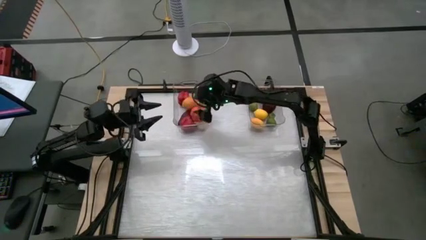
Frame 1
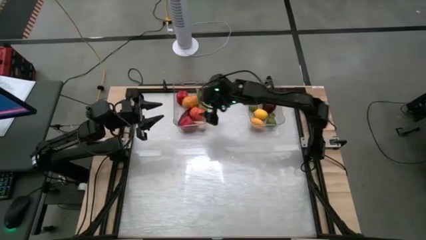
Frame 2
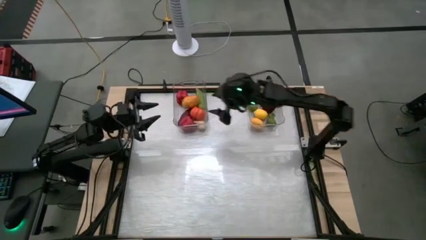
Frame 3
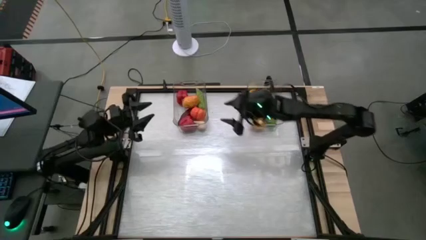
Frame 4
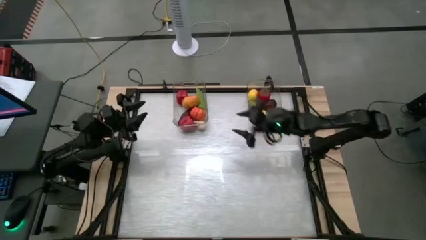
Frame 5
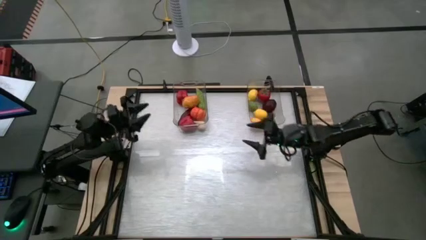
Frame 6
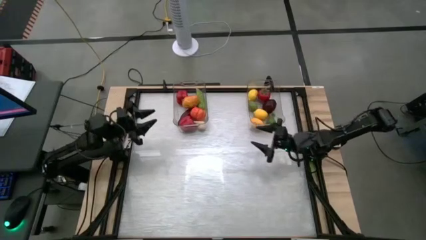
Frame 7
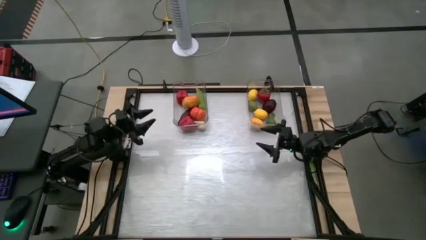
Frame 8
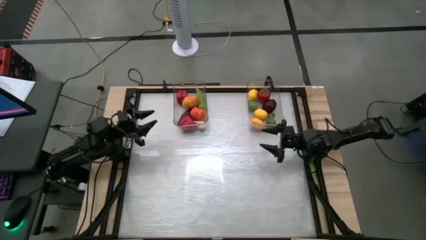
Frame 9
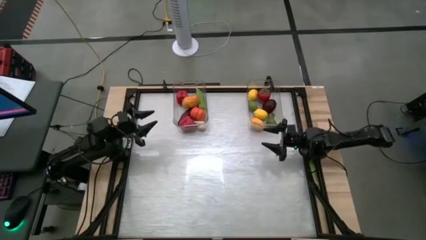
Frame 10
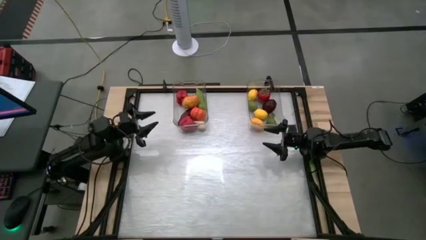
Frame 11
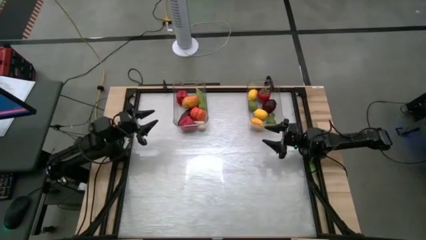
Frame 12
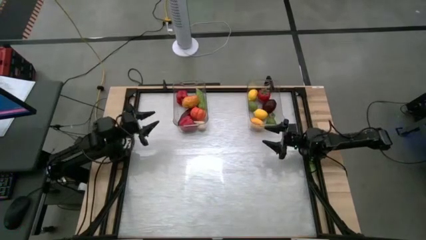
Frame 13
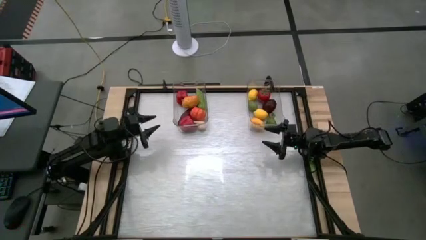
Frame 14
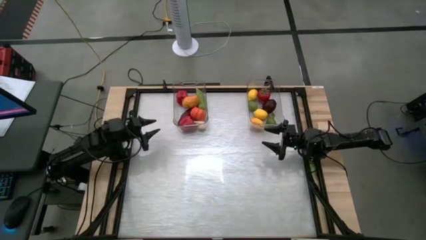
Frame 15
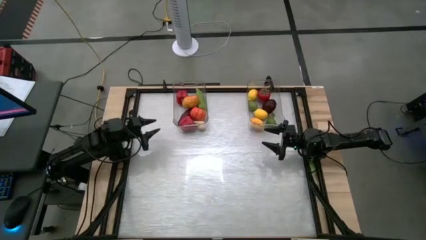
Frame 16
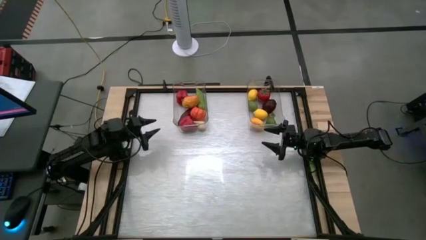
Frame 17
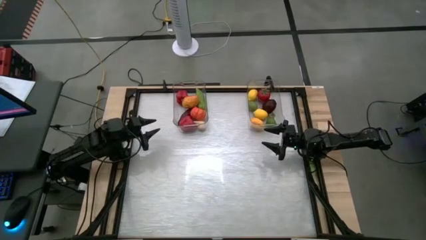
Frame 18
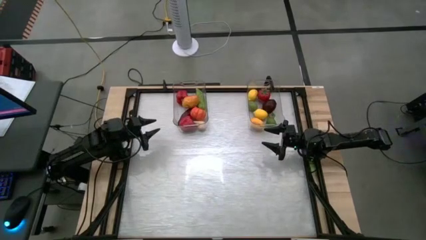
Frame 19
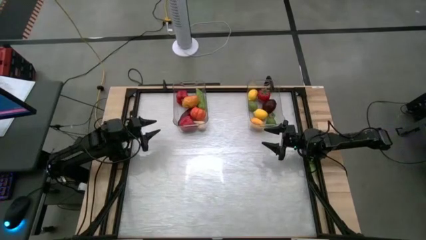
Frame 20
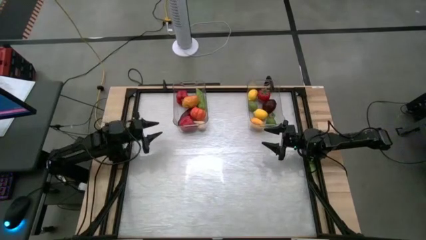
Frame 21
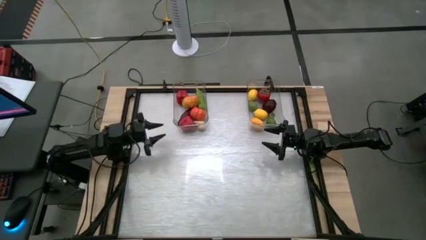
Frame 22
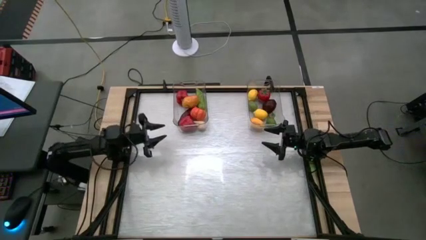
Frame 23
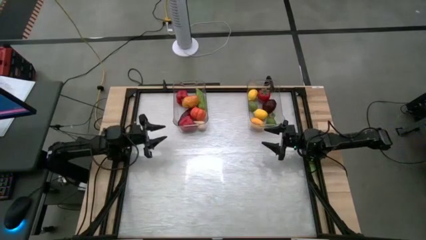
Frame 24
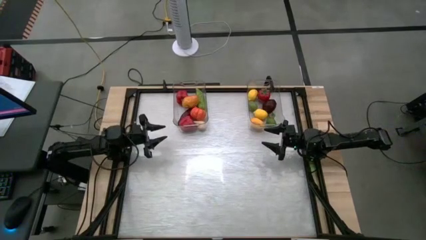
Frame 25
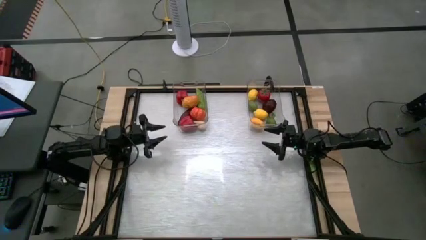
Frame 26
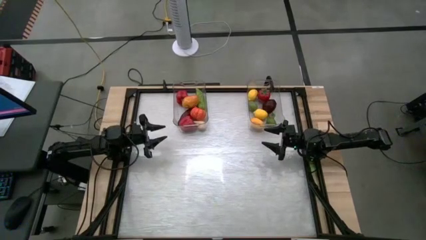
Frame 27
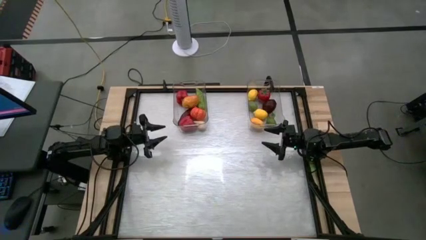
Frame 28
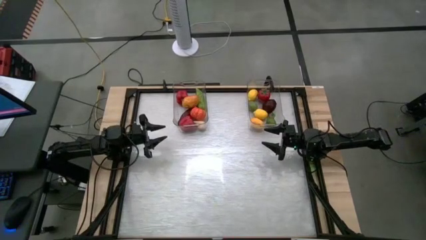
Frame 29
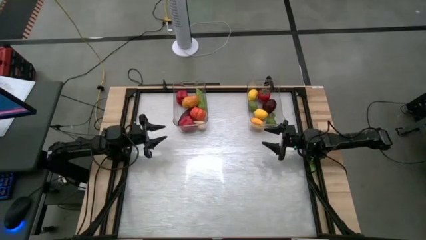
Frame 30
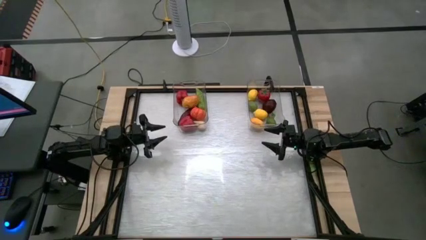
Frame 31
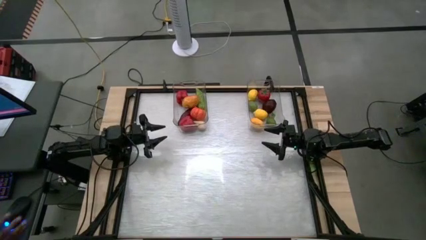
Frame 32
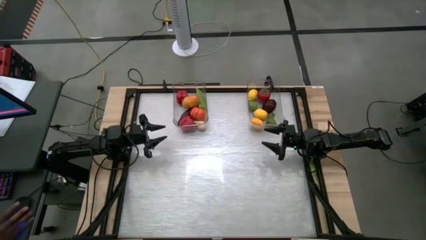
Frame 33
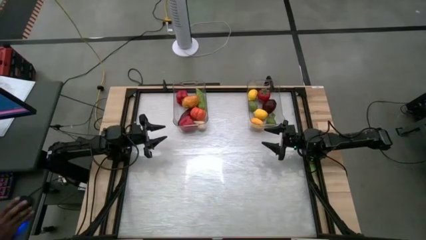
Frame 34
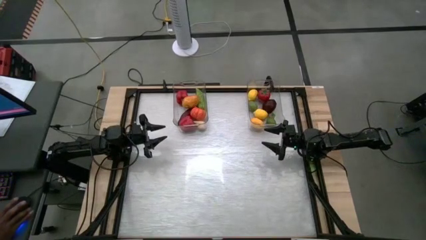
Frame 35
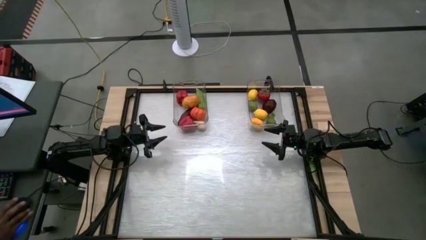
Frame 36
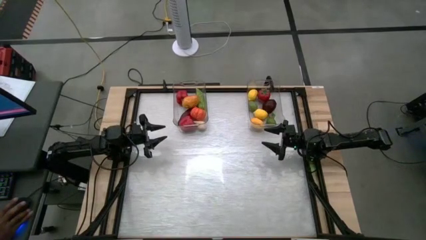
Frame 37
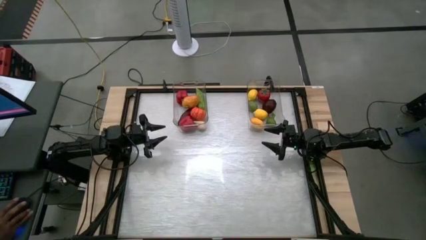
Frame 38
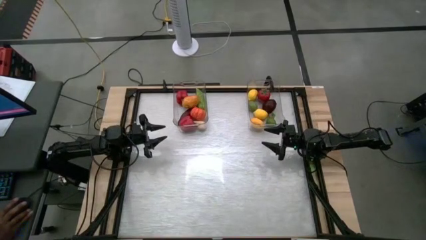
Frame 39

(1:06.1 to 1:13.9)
Task: Sort produce into baskets
Return to Home Position

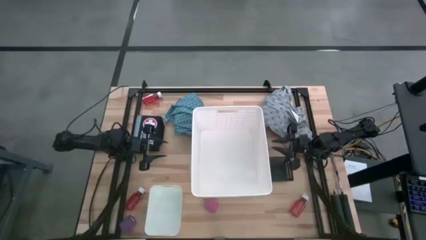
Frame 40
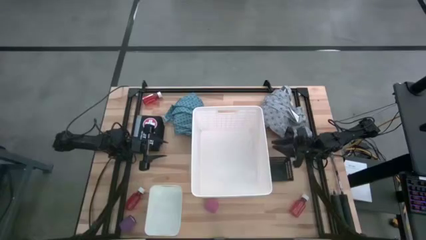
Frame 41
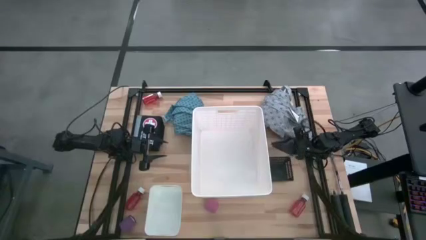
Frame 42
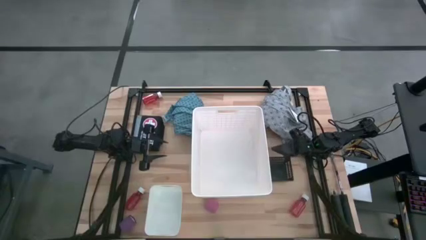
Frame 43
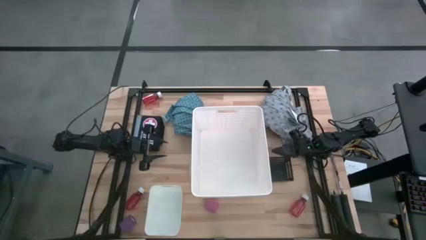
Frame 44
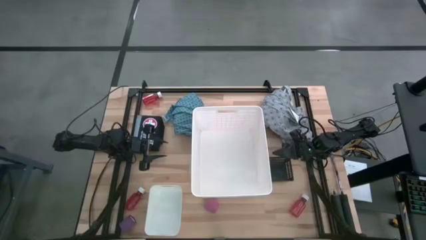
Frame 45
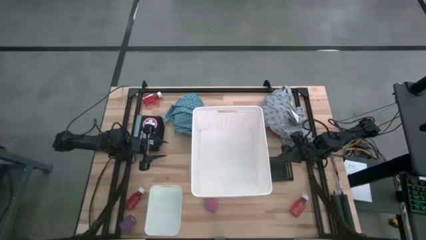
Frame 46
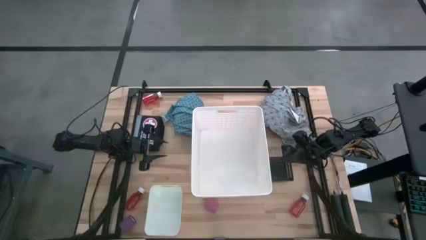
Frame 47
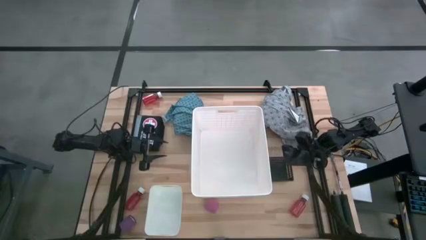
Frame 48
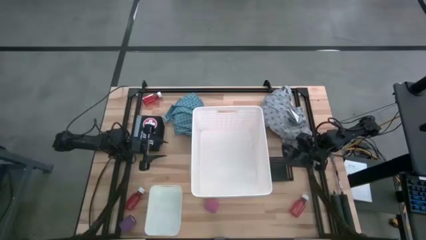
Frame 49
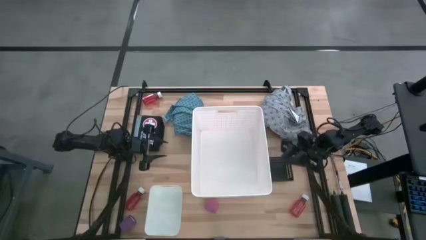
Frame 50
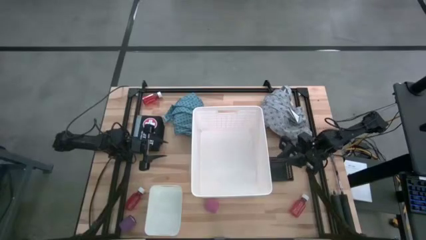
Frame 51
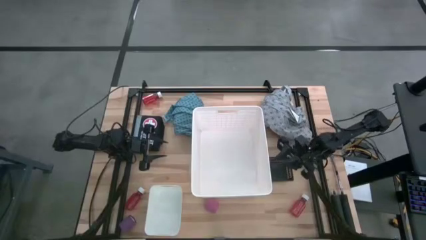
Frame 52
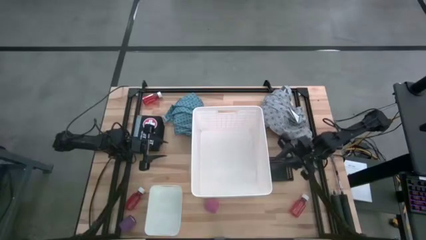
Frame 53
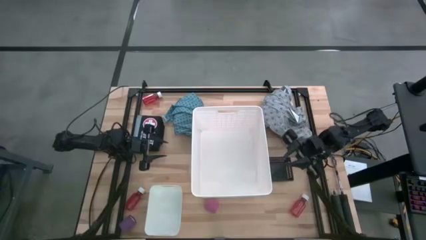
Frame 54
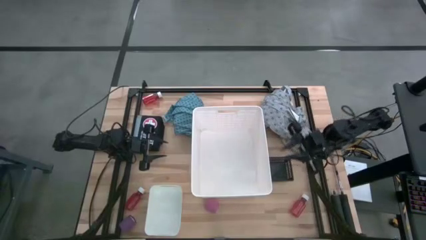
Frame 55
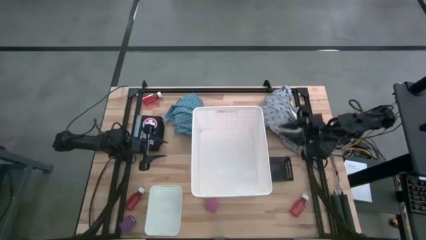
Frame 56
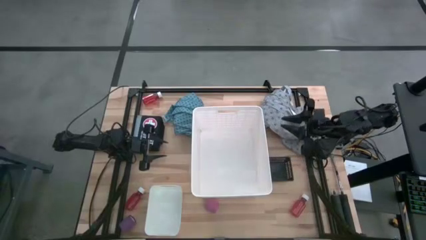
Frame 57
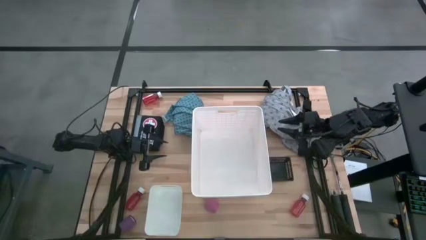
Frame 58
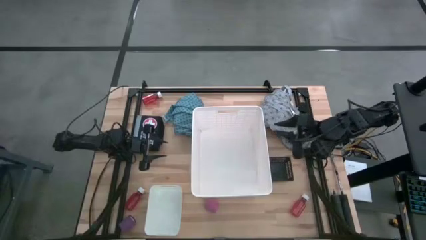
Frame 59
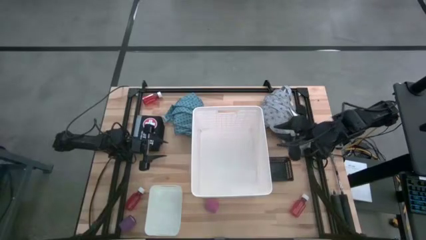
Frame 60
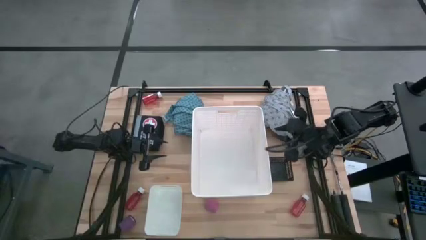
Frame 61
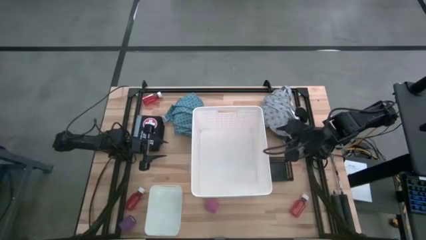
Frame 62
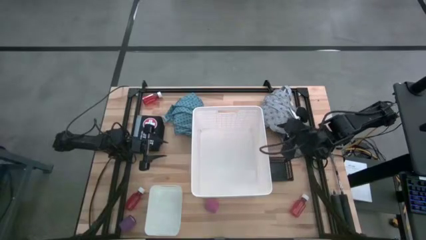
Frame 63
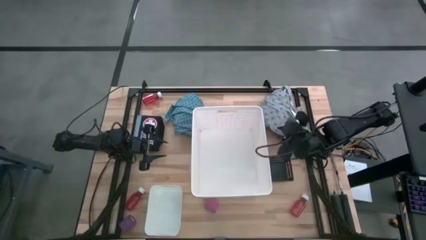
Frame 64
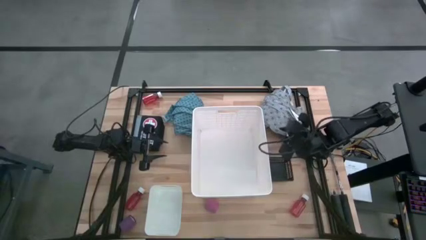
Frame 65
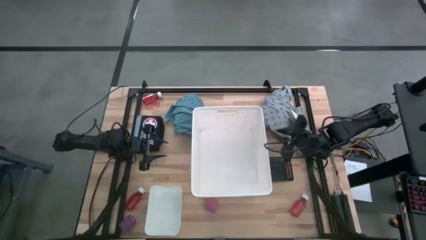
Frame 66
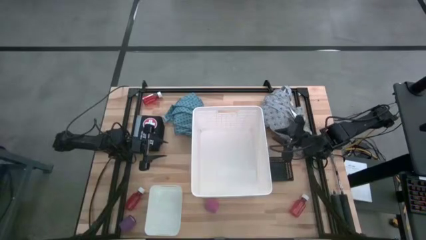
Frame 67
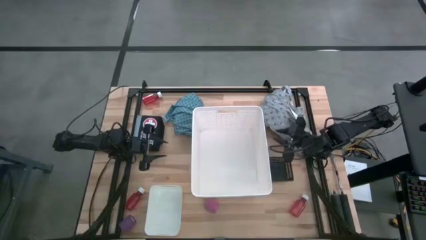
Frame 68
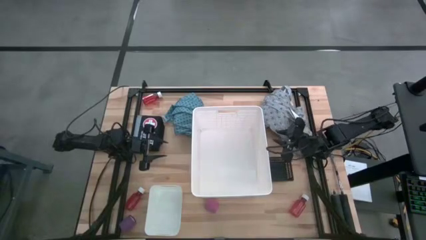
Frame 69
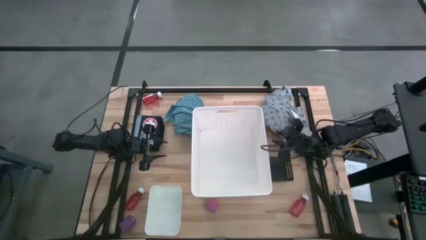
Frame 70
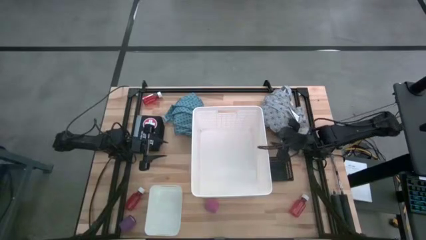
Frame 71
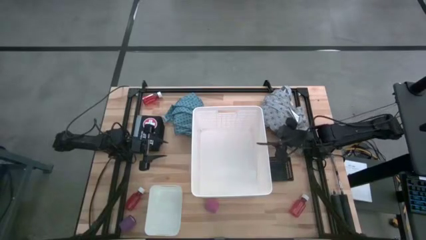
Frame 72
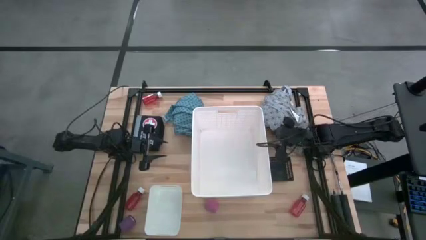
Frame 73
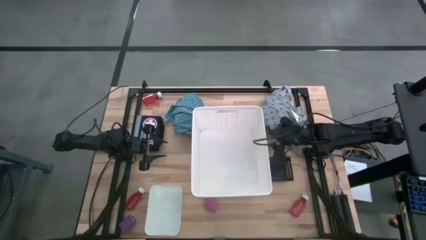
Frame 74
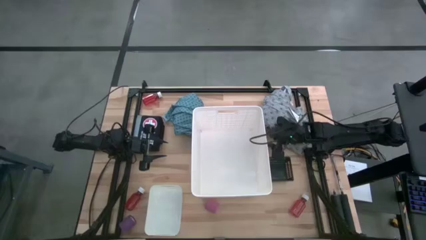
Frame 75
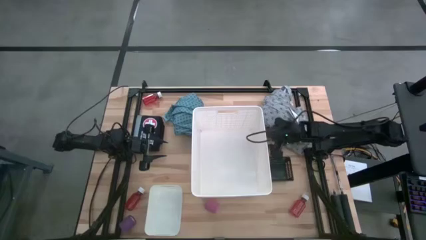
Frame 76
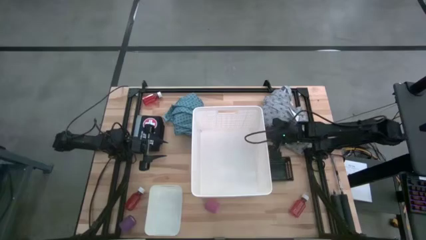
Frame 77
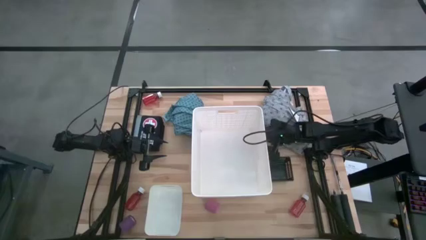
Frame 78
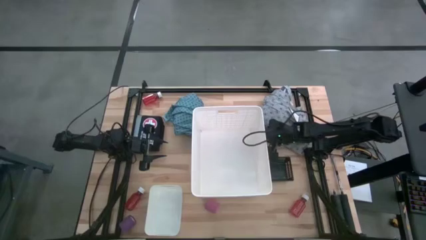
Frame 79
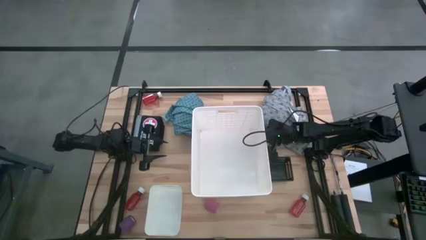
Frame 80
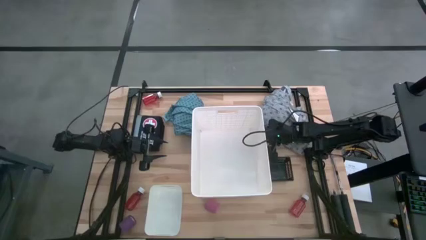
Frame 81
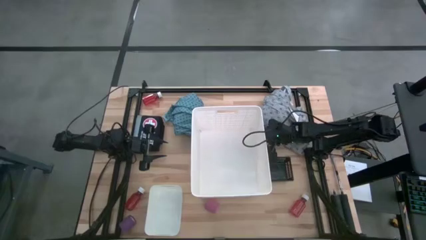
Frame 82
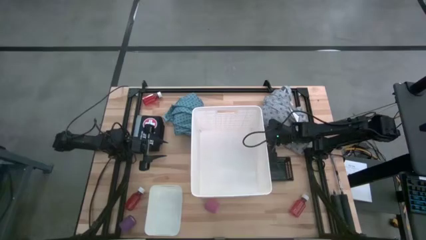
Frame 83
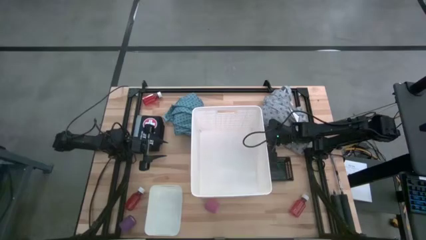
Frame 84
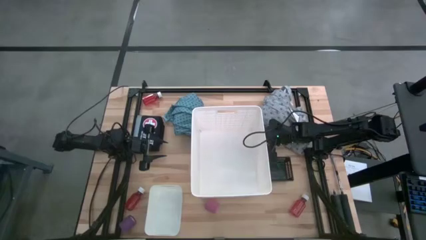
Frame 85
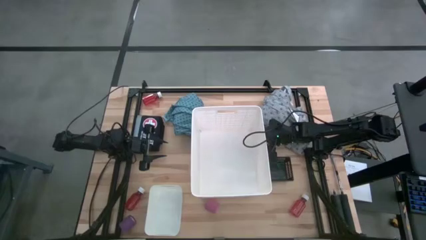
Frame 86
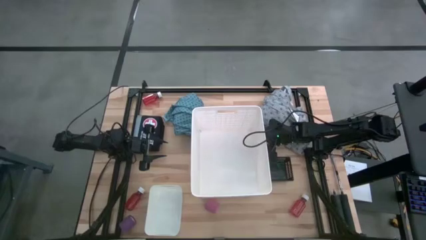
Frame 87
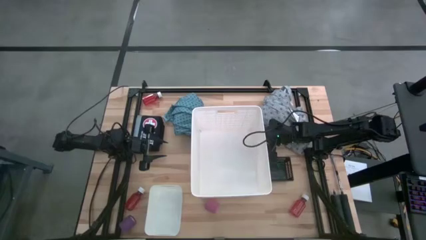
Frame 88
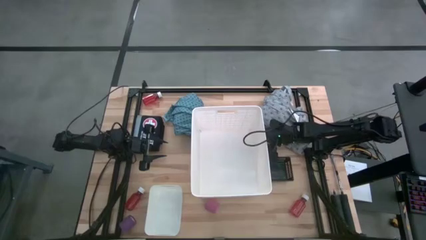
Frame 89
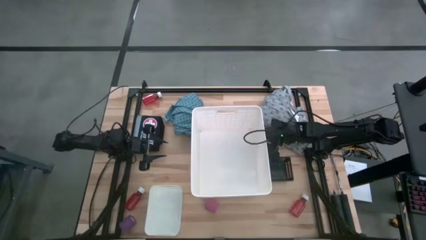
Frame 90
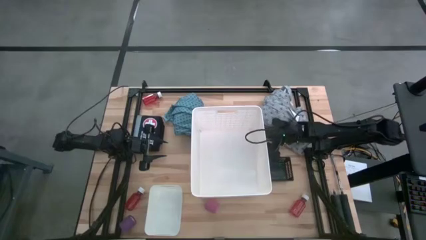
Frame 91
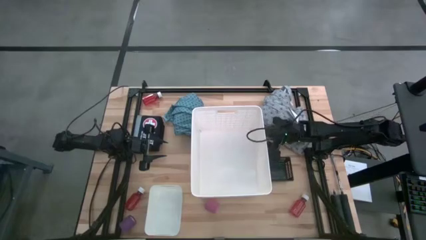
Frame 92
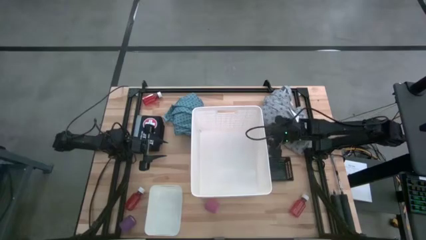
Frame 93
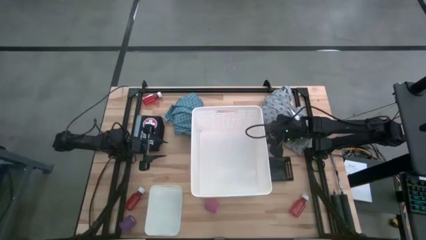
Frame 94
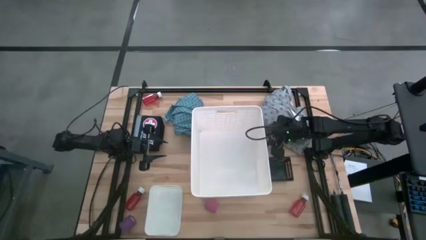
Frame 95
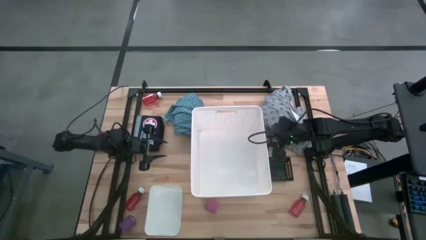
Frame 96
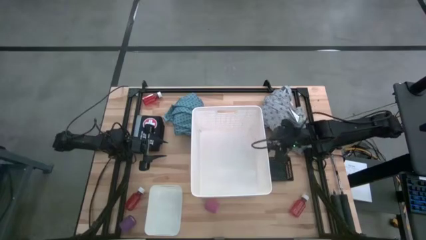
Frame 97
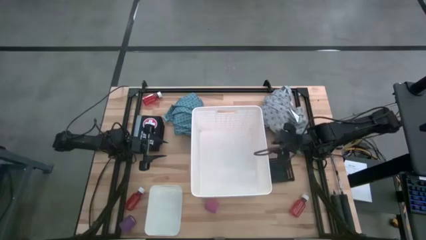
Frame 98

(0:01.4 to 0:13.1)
Task: Pick & place medical supplies in basket/bin
Put the black bandage into the black bin
